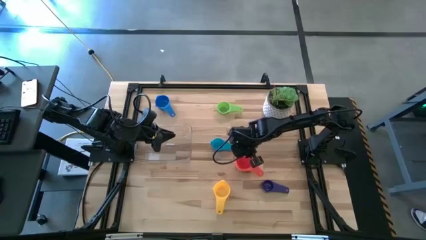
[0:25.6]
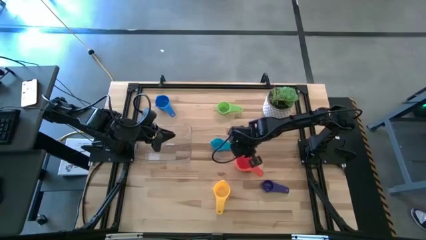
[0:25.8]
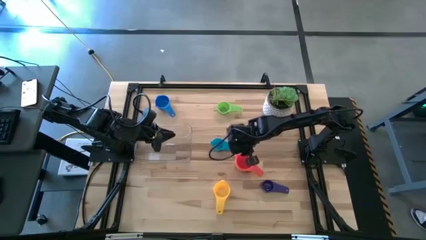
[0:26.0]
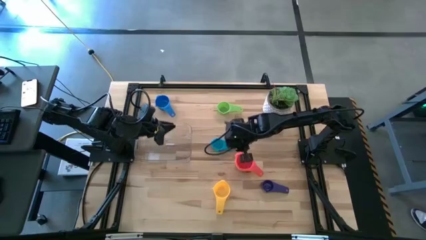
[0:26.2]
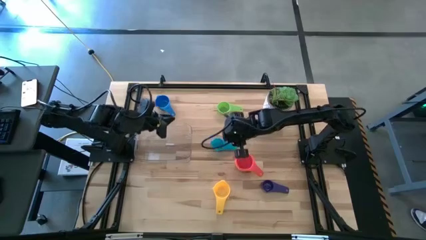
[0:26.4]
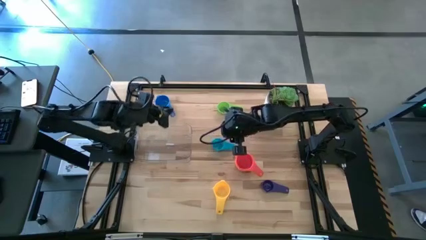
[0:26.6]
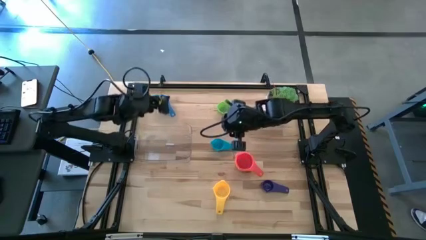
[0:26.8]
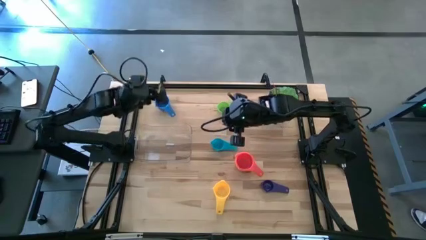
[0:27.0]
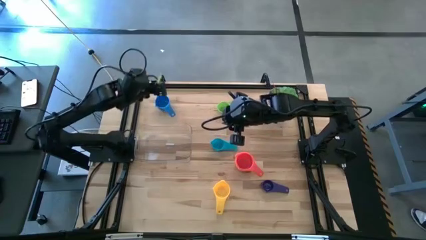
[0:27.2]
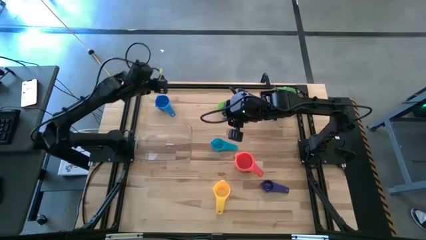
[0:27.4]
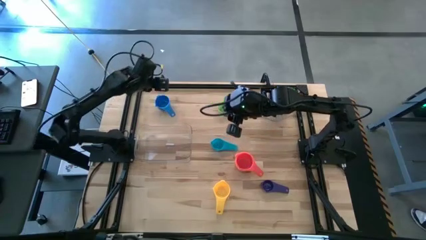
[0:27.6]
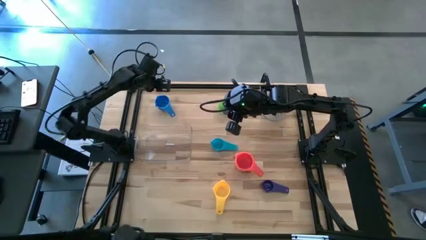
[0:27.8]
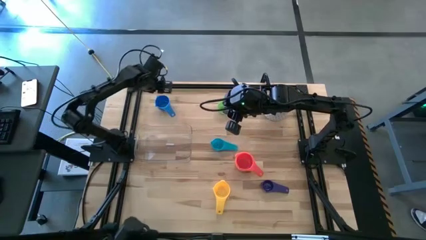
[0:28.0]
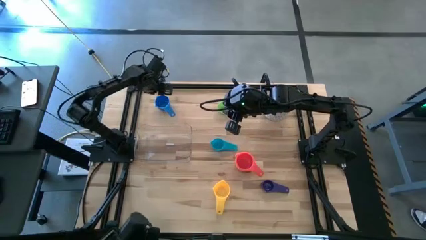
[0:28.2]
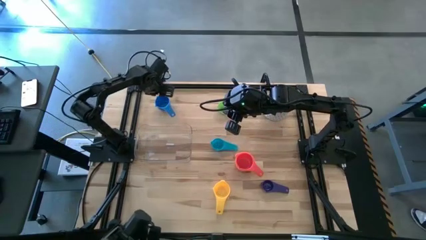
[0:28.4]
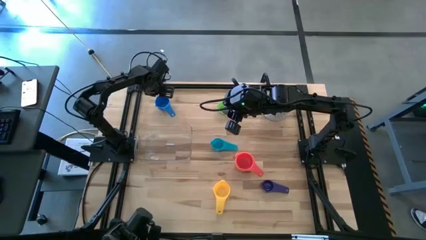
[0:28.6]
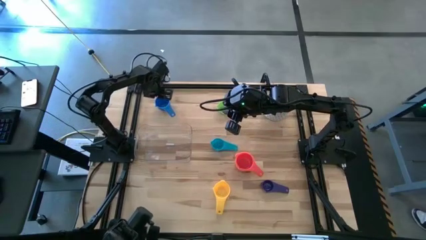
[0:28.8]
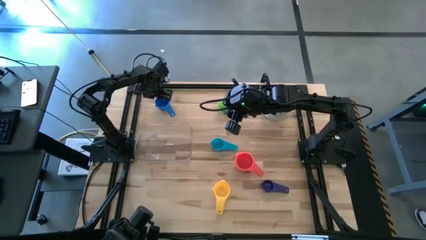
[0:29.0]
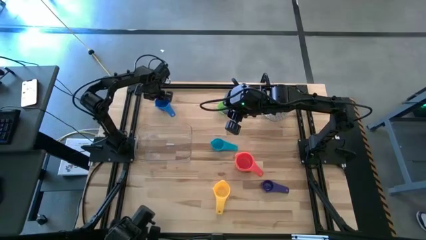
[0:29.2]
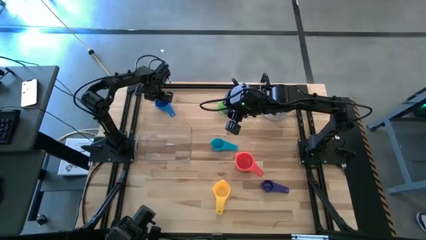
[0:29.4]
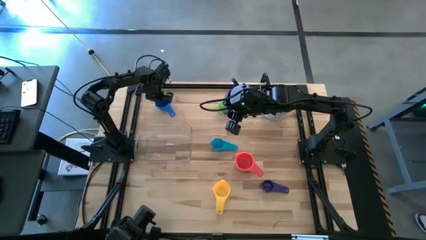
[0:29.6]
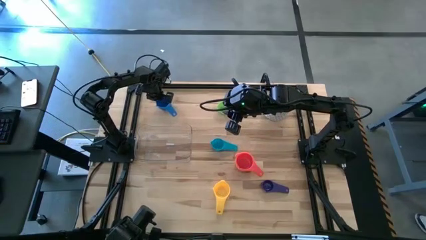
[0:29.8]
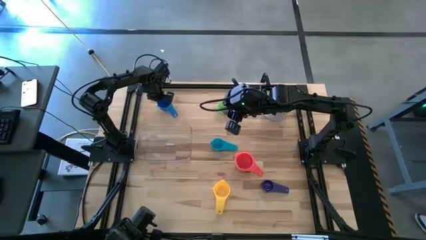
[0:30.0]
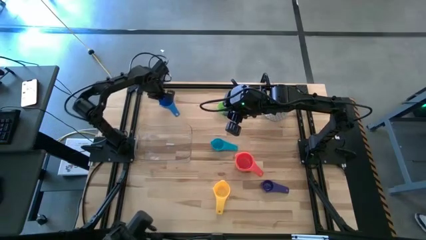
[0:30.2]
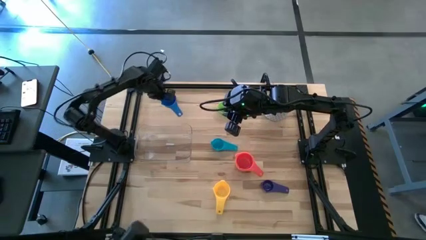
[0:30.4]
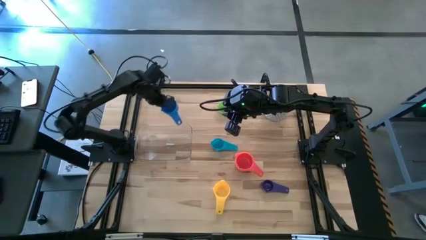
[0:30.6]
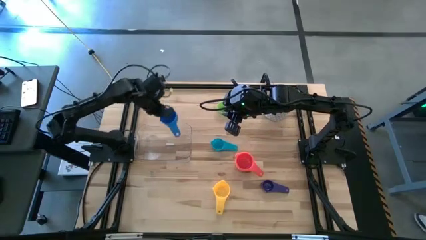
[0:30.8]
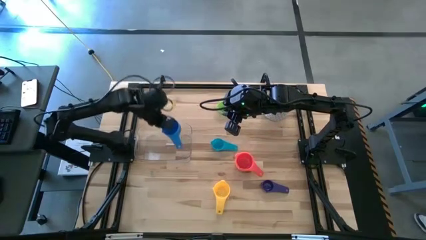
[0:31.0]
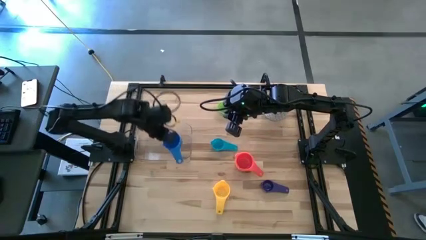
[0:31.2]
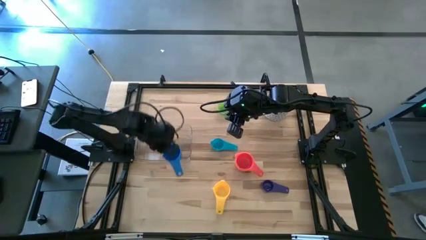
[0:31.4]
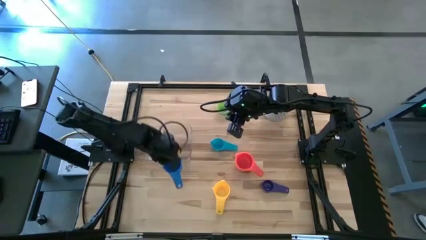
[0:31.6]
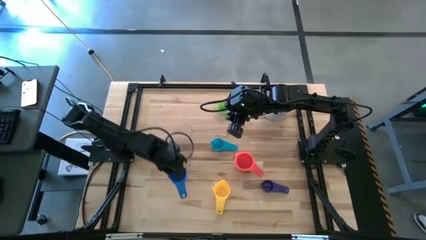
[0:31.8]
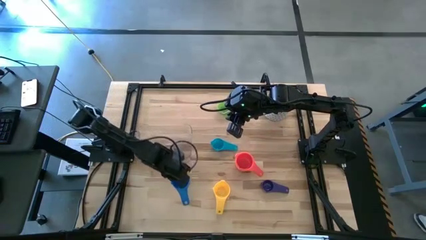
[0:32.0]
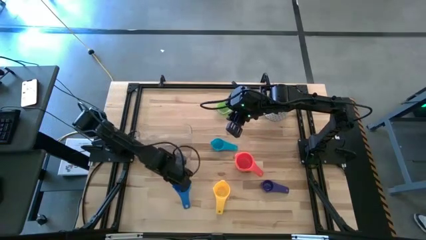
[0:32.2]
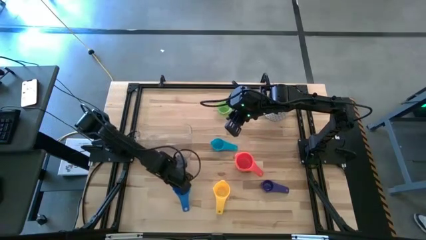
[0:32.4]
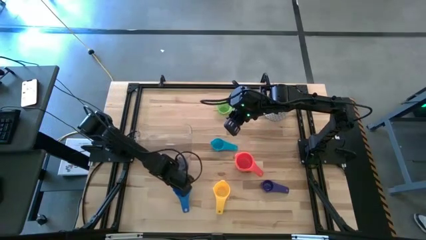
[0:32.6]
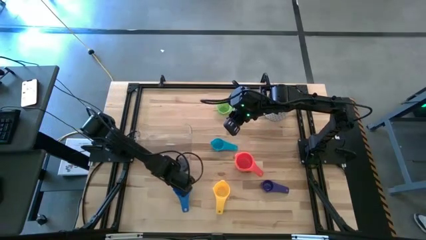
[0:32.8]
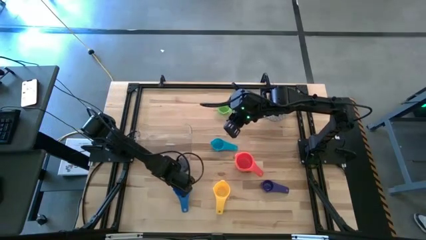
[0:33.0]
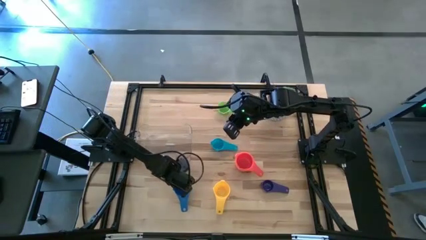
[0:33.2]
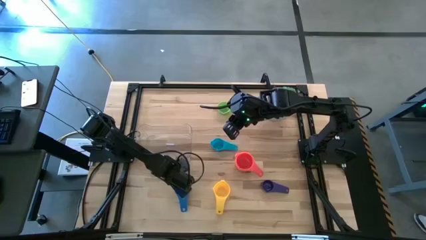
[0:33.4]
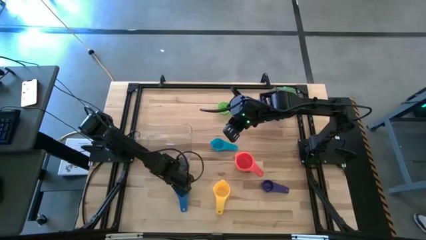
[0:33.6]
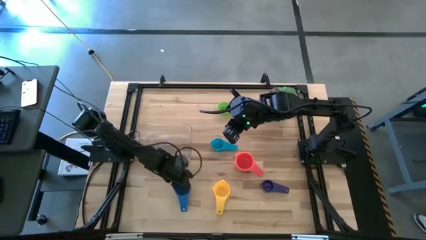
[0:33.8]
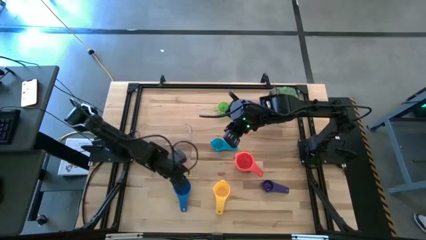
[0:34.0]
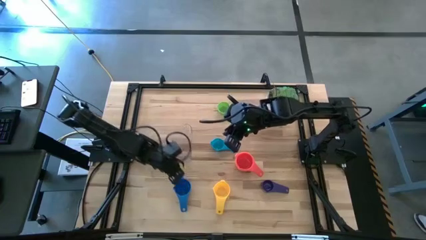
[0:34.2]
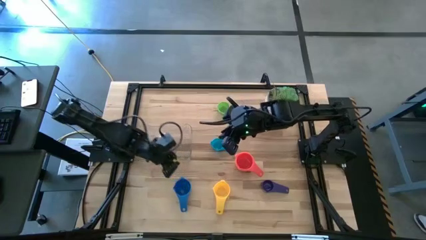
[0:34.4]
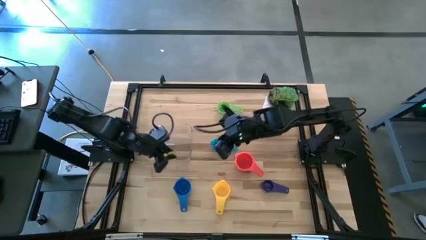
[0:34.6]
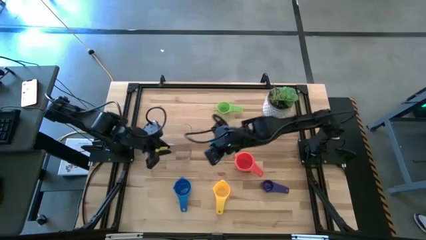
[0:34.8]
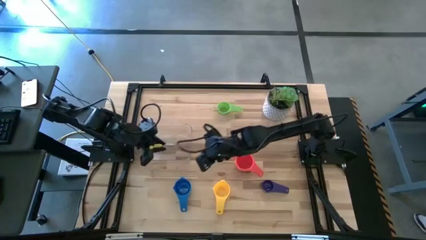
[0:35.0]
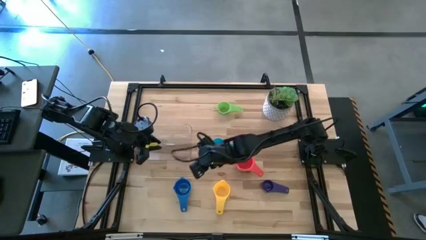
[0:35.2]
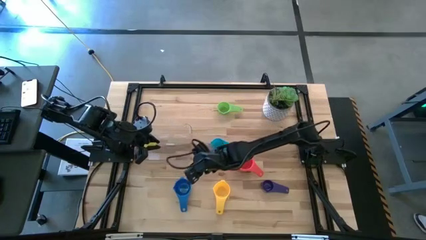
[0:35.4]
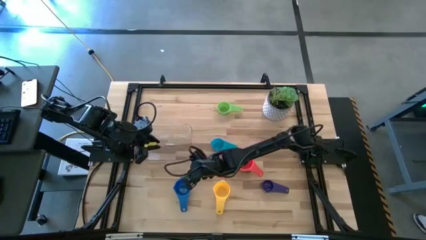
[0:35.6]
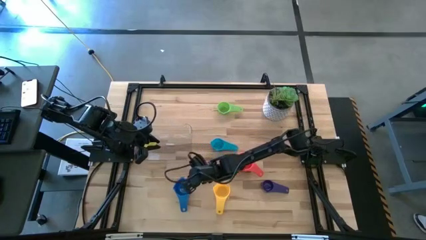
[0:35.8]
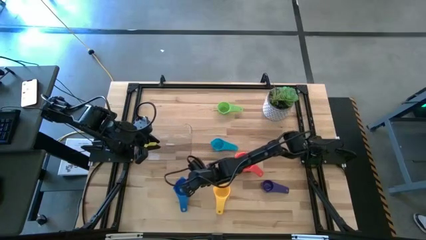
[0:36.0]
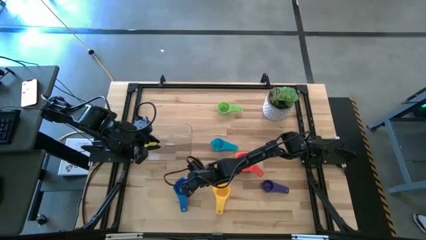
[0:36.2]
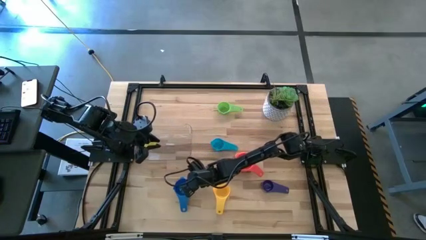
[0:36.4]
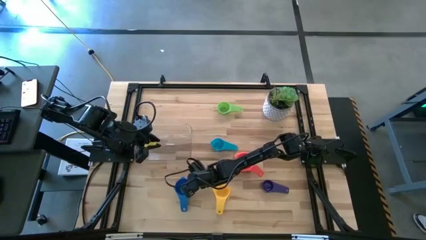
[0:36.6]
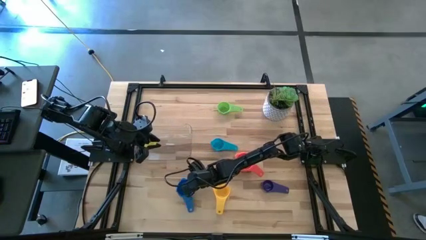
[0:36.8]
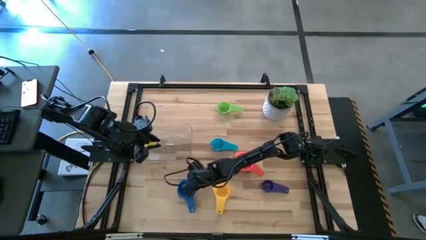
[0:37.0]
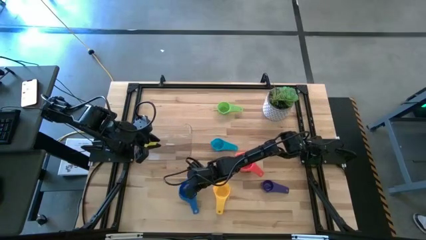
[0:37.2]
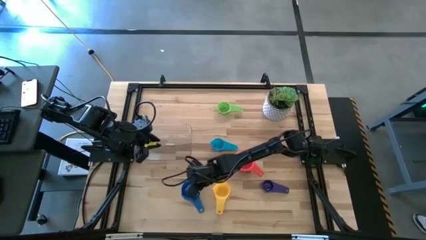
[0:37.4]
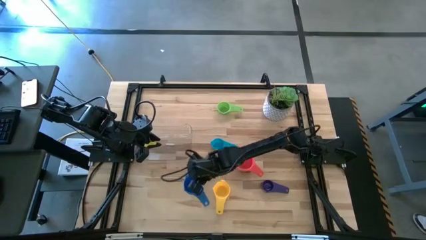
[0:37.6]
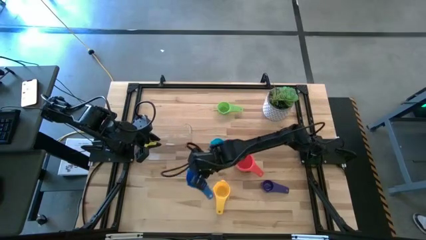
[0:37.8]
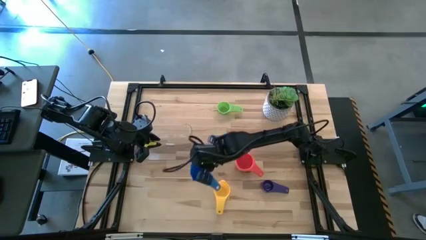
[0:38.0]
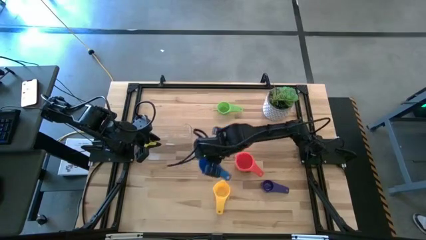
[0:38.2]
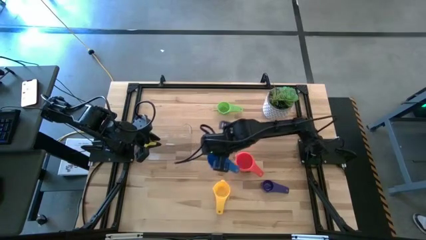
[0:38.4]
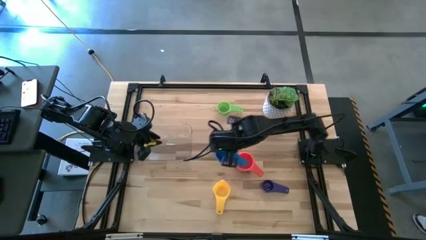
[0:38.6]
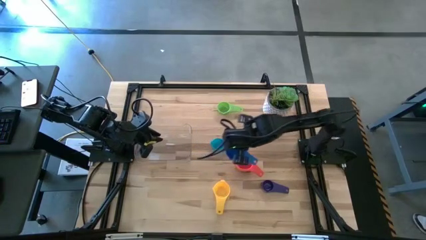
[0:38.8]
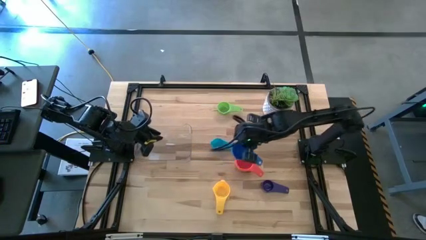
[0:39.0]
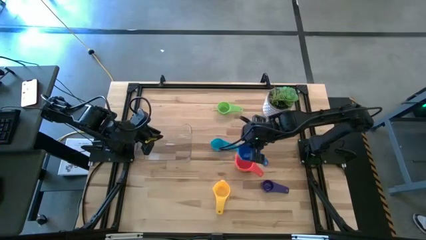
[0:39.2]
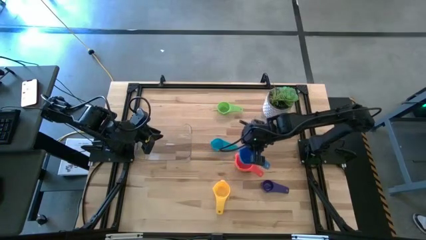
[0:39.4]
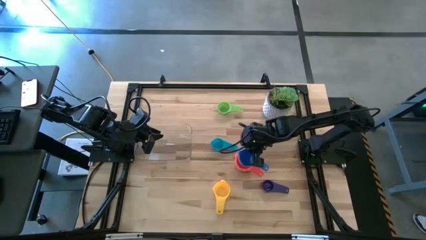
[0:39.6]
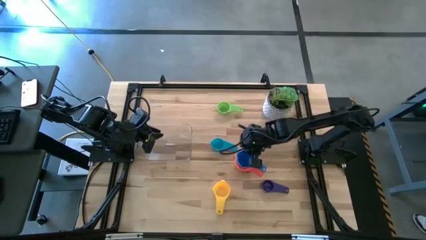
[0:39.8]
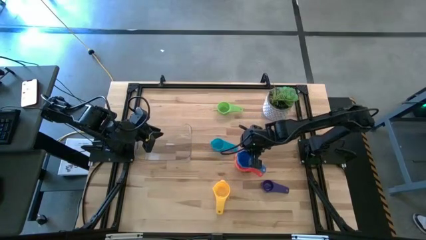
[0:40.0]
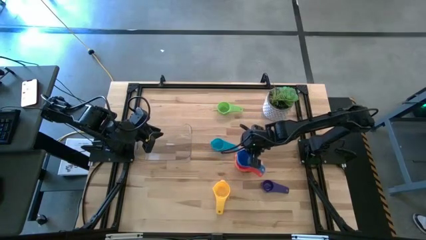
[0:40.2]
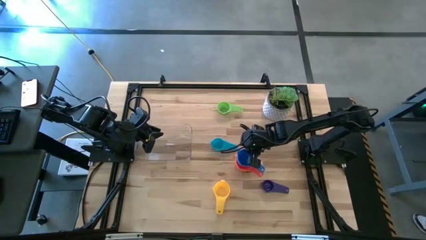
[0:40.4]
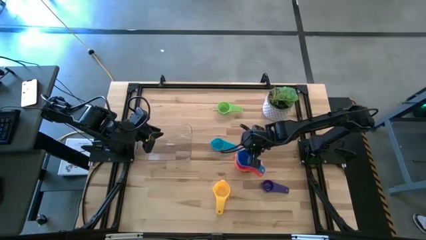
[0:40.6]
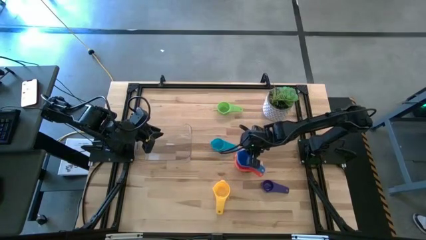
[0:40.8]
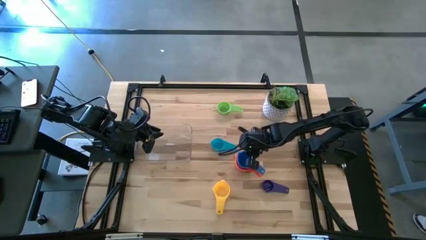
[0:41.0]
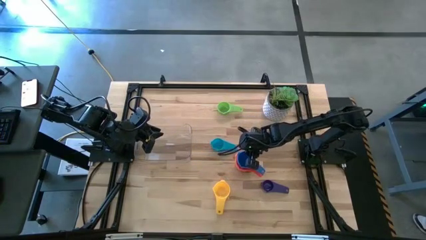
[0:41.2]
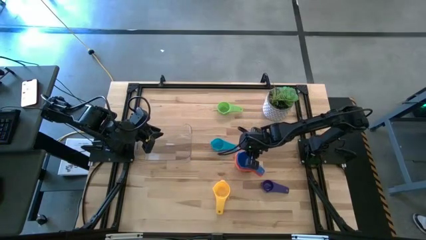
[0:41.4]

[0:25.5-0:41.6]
Task: Nest measuring cups in basket
Stack the blue measuring cup into the red stacked measuring cups
